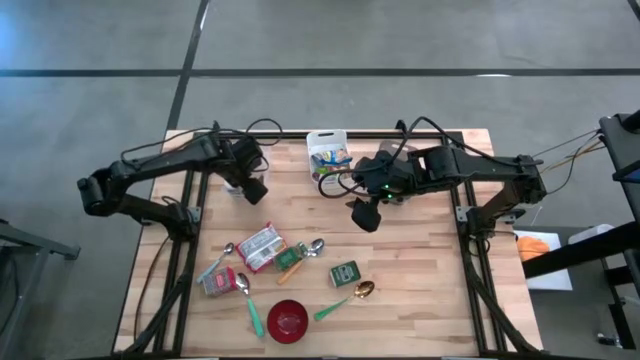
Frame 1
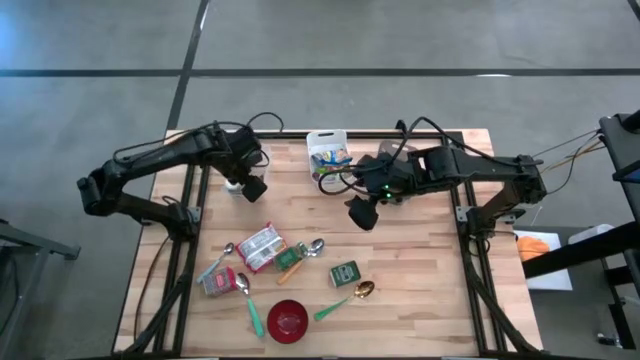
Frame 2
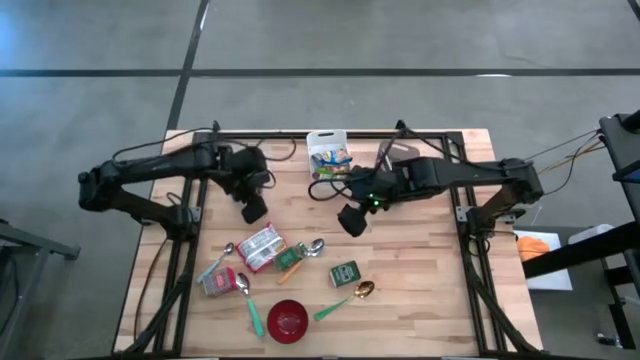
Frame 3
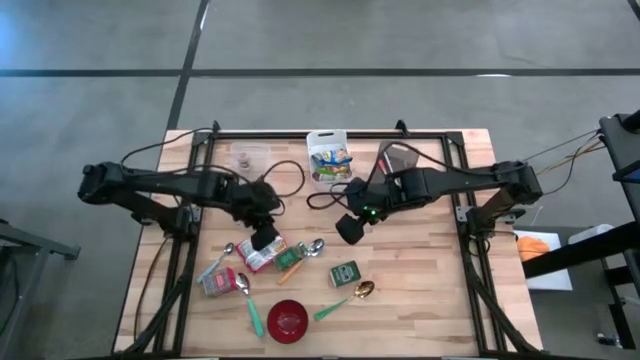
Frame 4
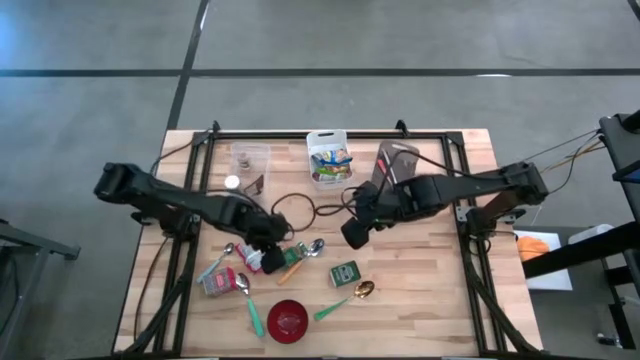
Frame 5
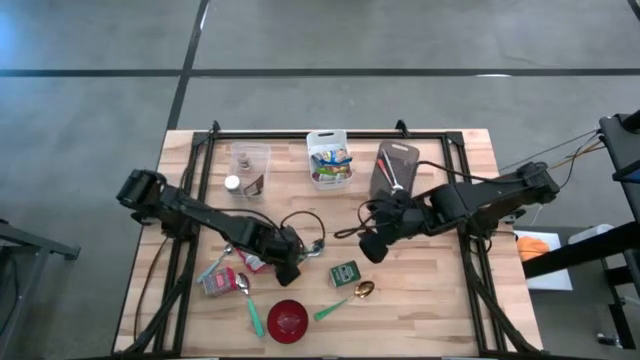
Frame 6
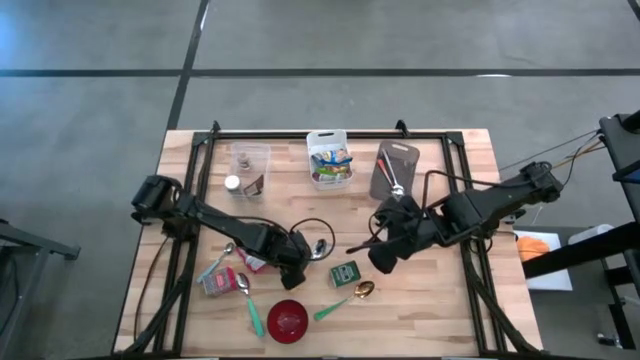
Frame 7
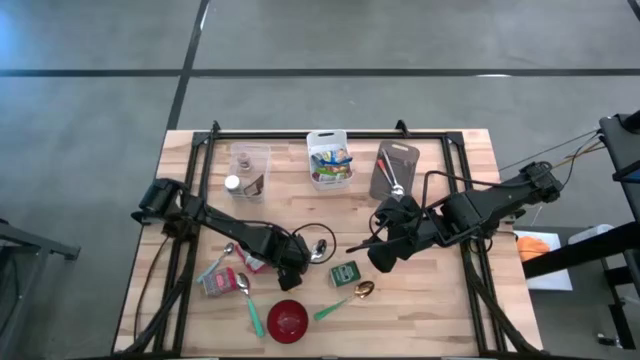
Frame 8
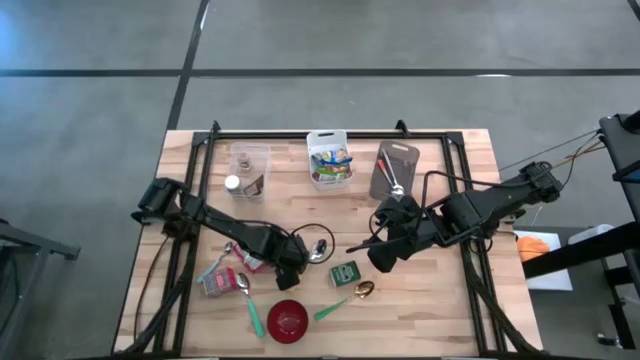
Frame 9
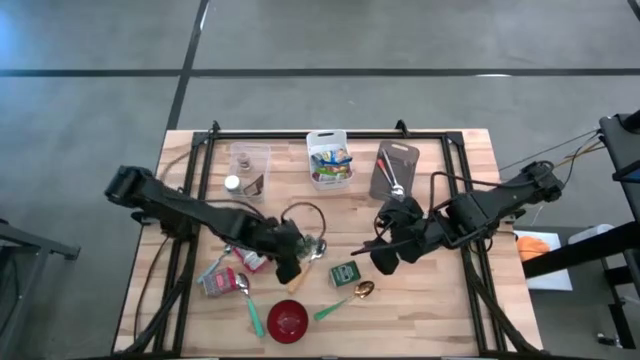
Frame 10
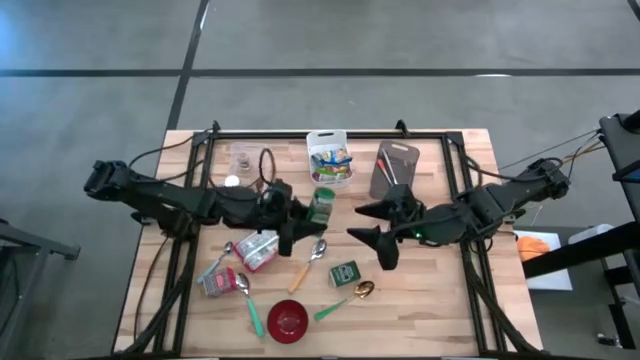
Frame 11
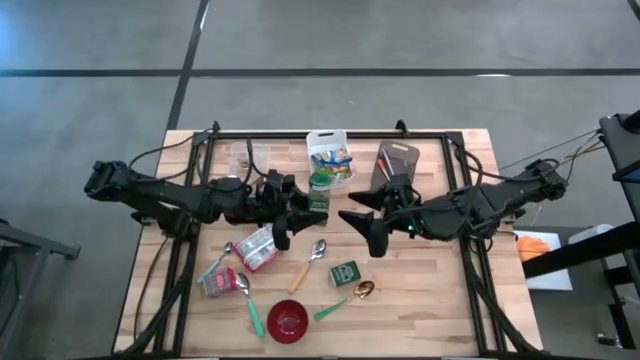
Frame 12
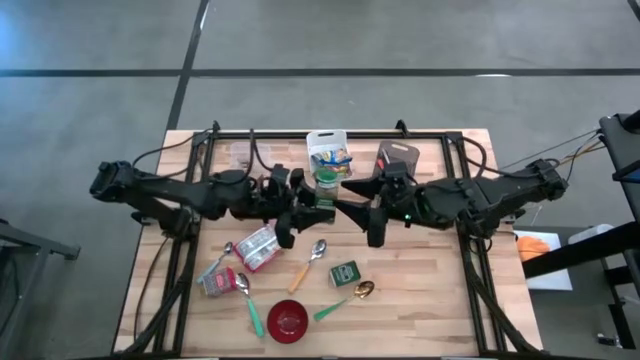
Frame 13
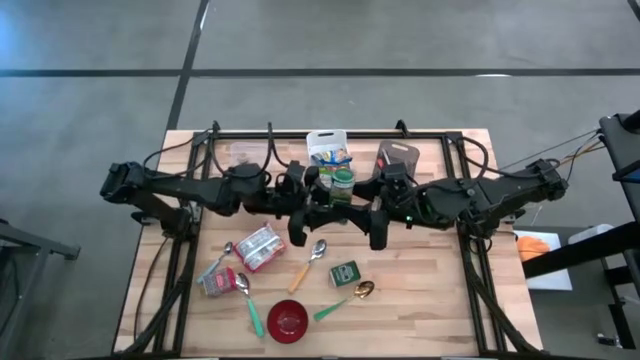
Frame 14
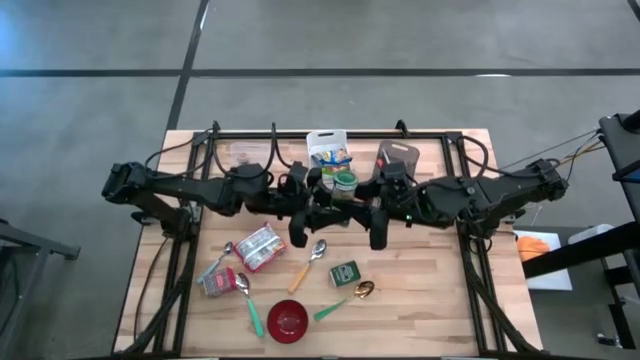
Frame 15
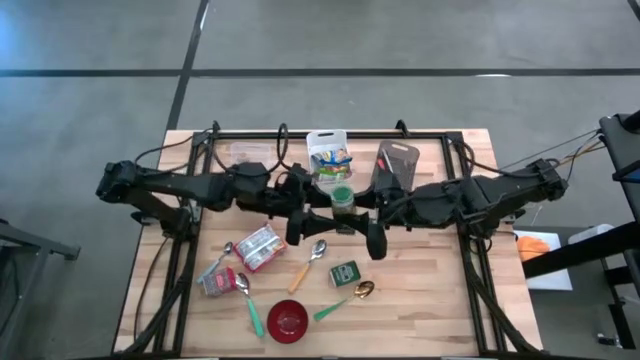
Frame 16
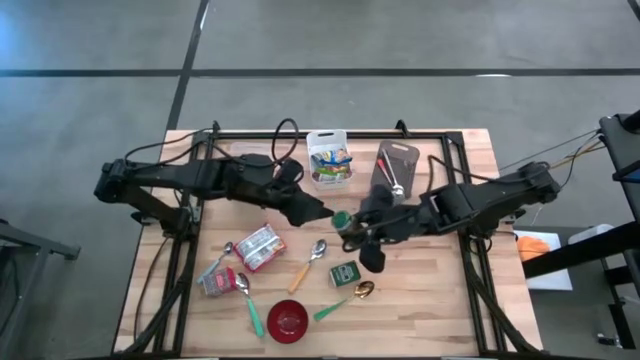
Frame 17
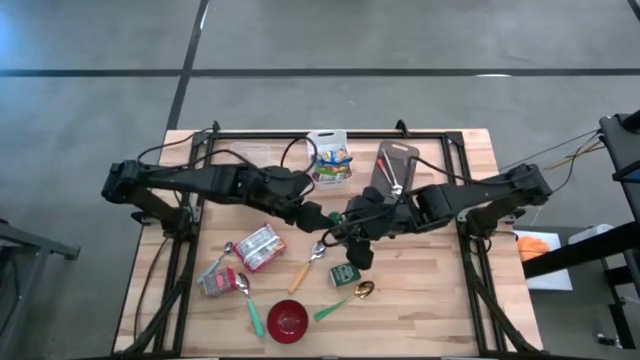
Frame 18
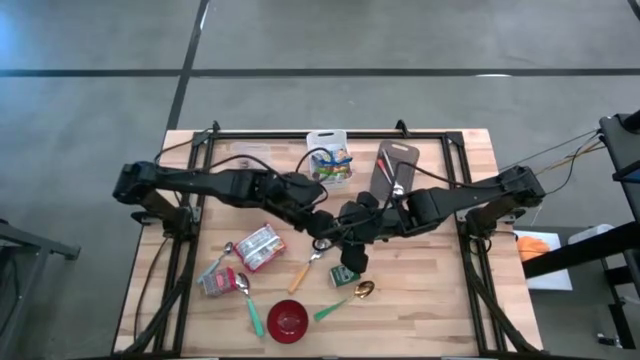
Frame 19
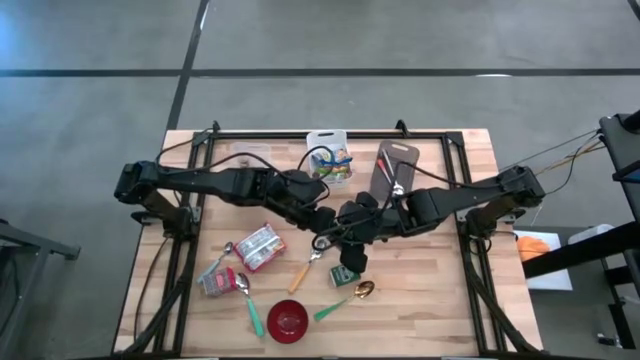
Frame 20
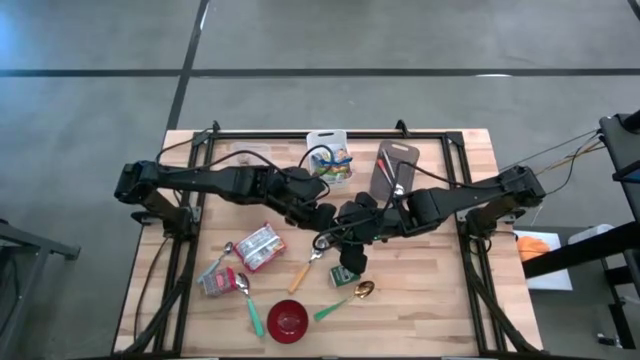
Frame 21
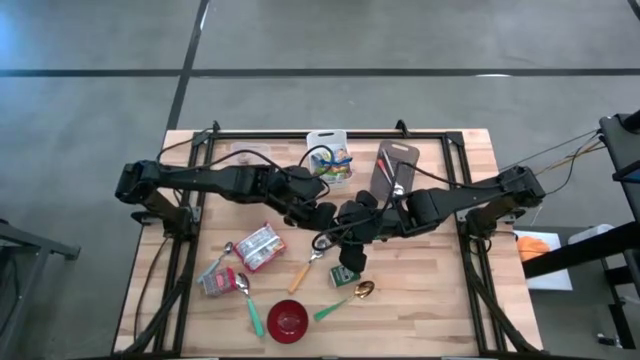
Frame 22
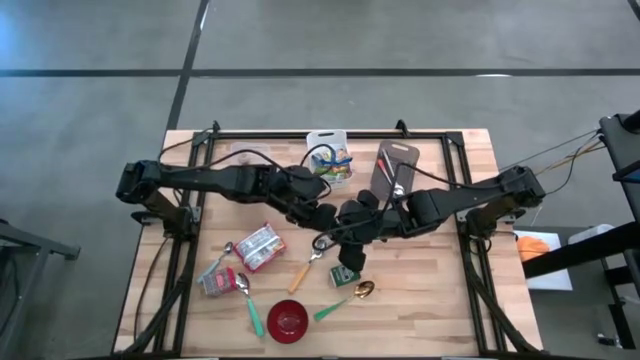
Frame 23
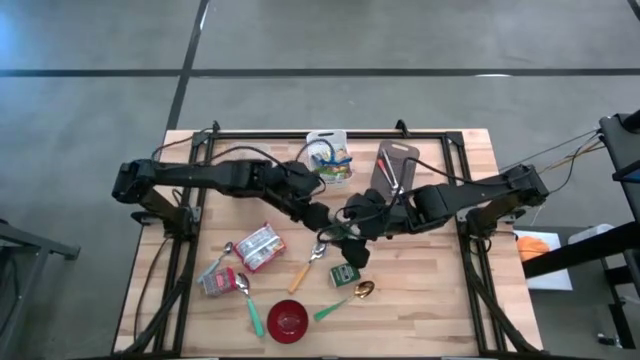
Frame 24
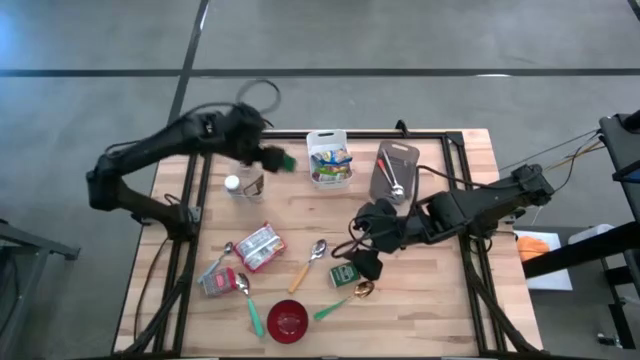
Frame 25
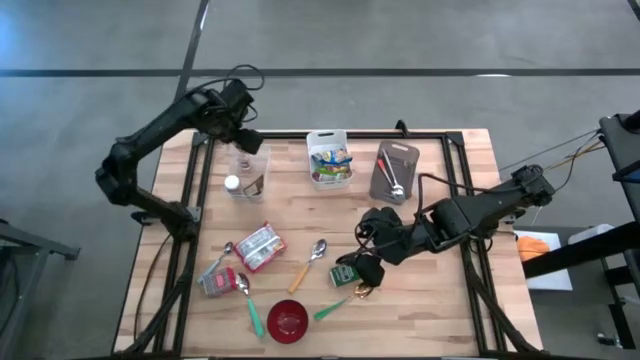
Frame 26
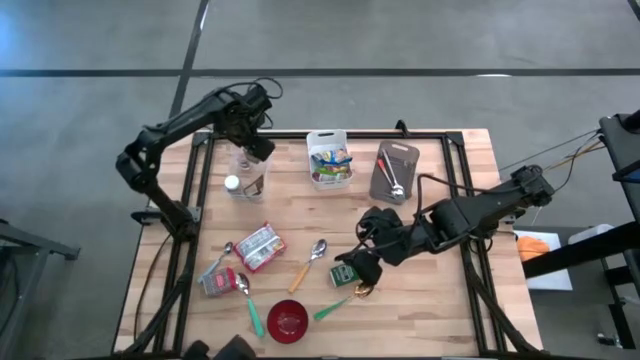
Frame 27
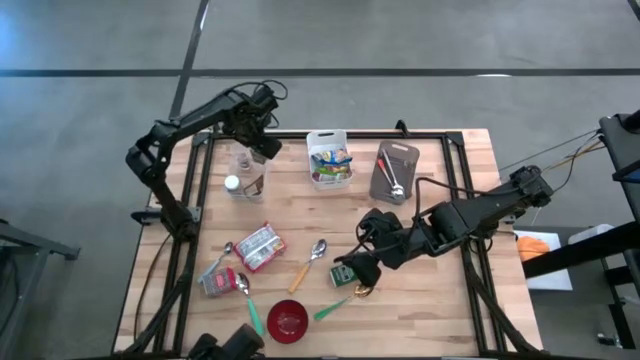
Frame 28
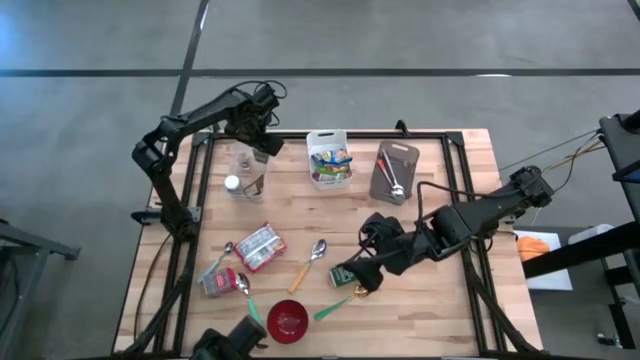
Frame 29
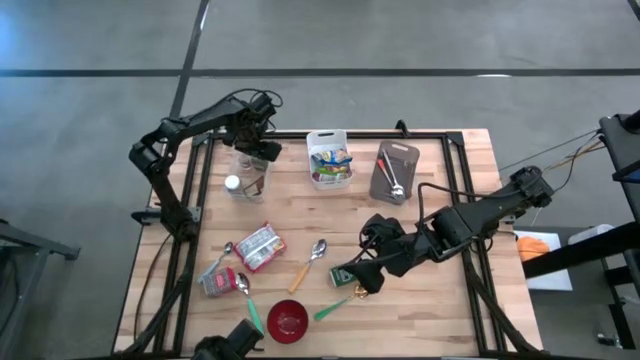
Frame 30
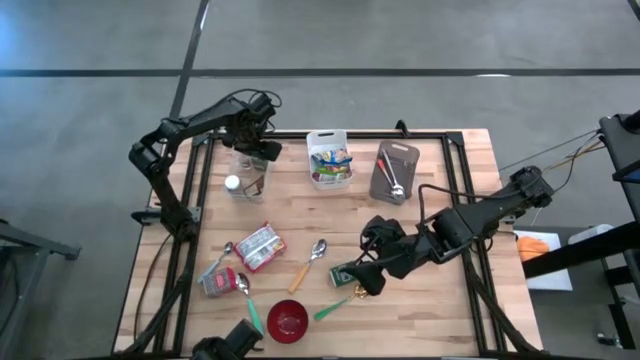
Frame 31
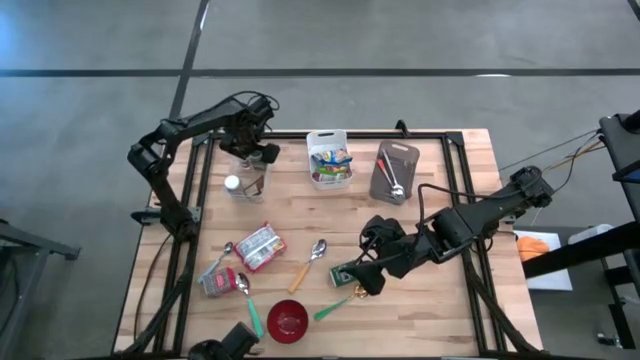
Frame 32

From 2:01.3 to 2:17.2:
Put the green seasoning bottle into the transparent bin

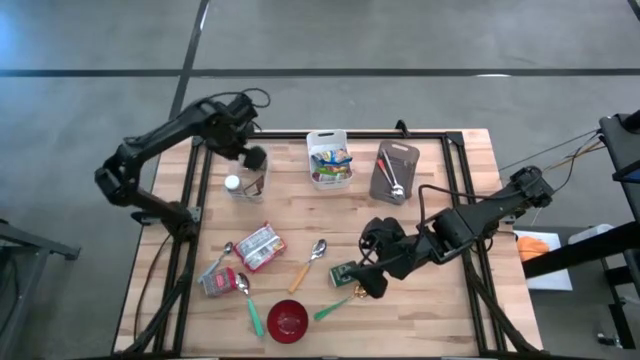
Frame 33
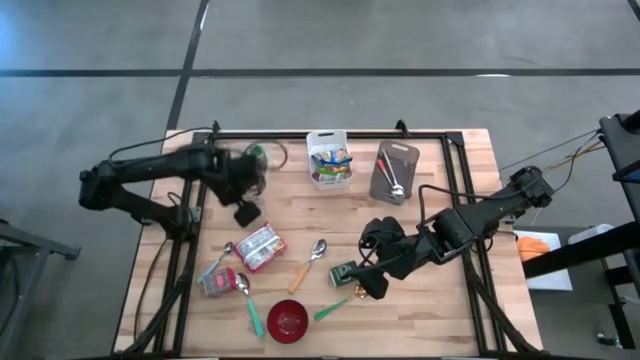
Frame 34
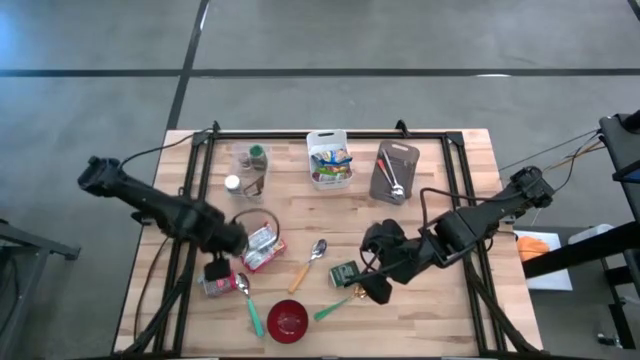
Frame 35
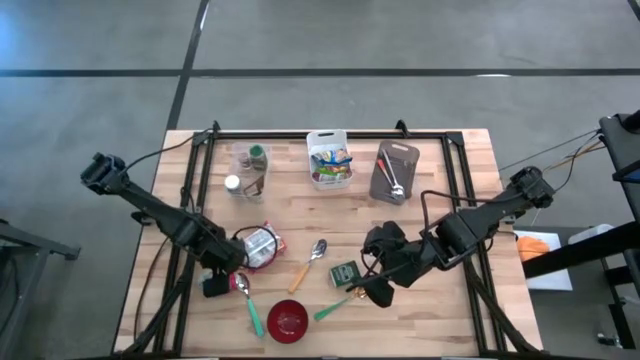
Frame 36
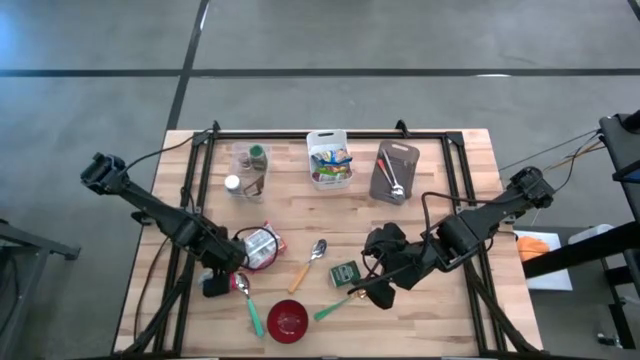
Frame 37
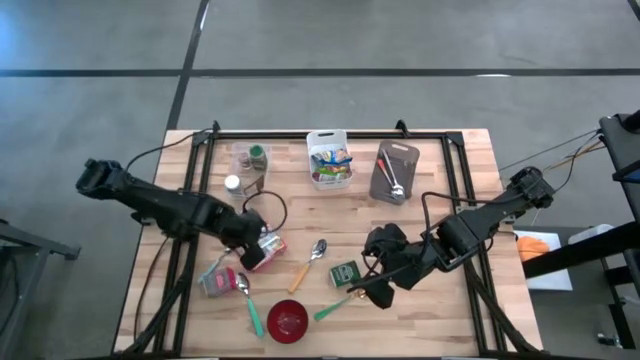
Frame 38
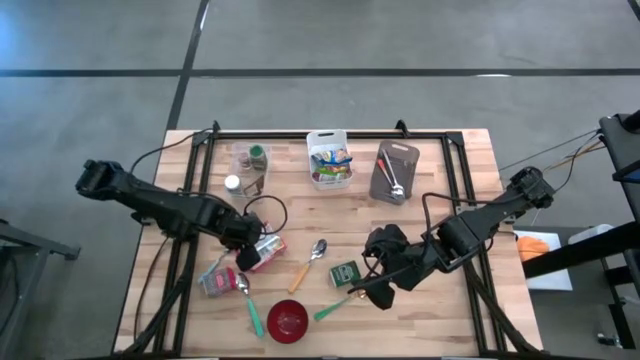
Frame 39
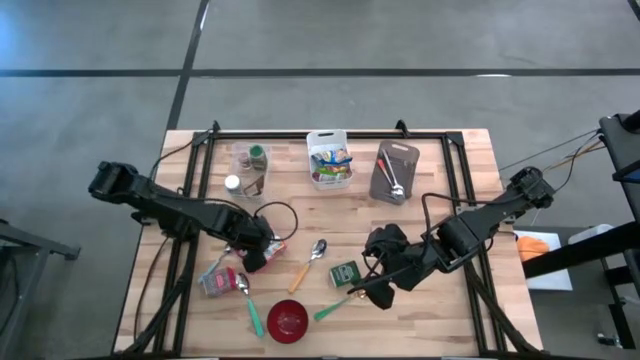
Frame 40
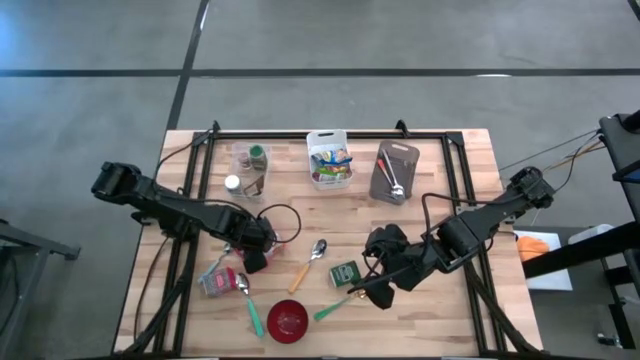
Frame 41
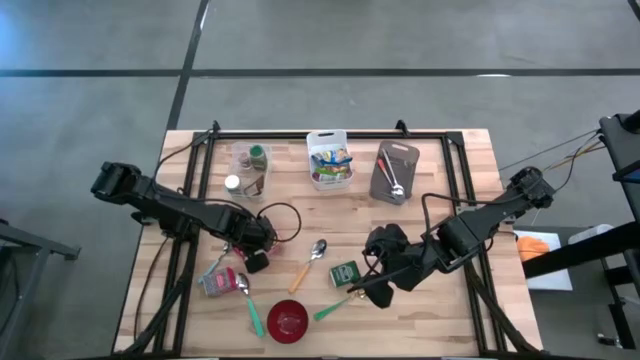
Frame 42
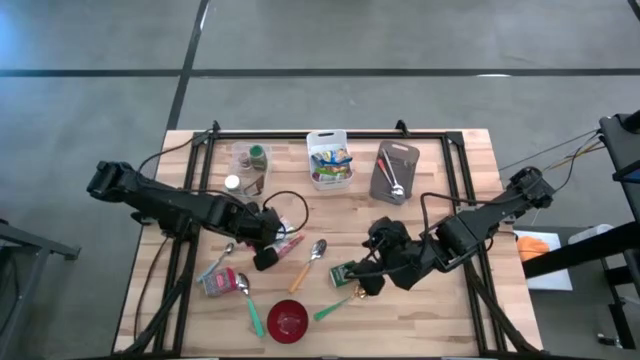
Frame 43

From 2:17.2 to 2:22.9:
Put the red noodle pack into the white bin
